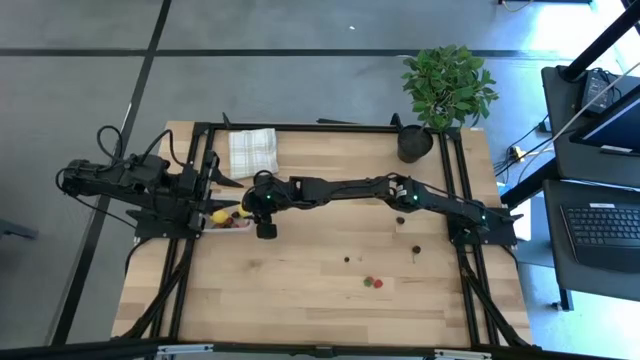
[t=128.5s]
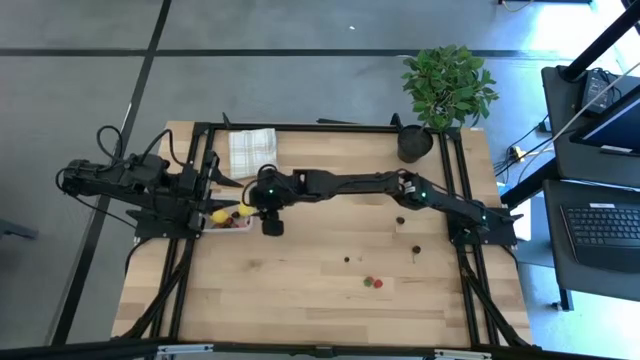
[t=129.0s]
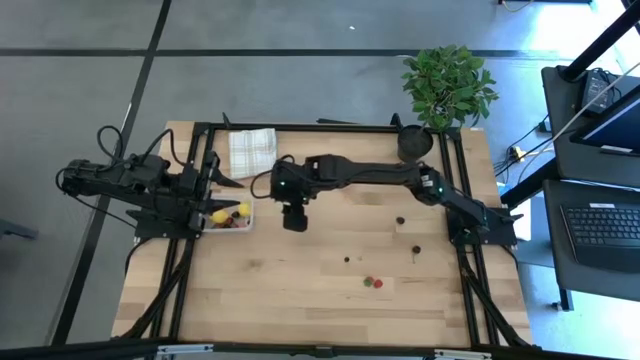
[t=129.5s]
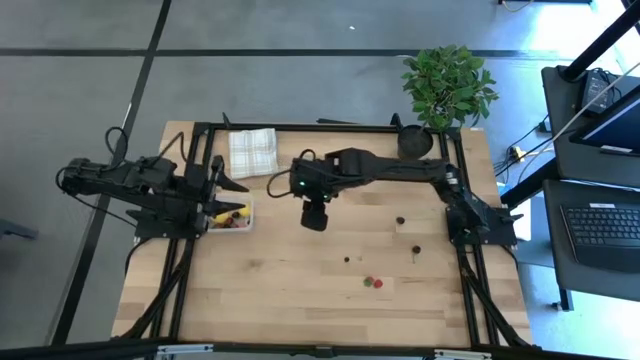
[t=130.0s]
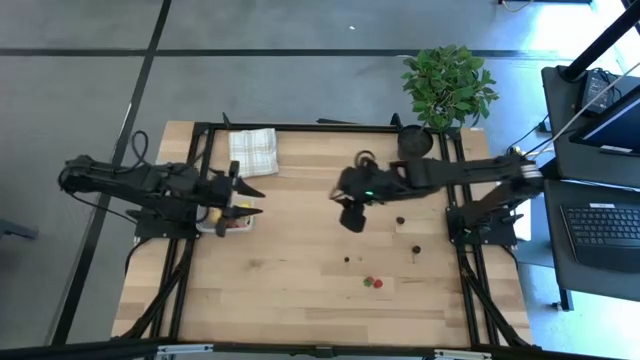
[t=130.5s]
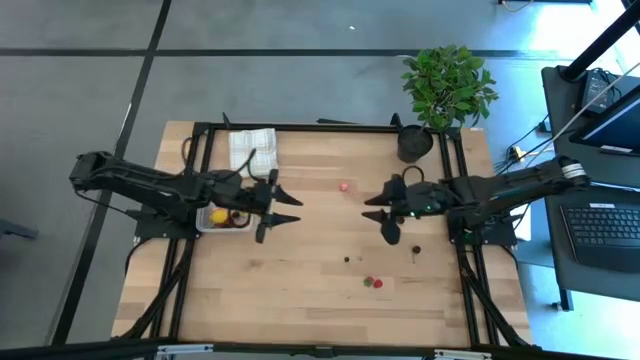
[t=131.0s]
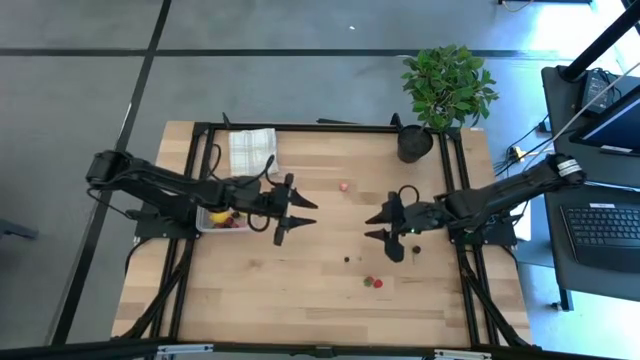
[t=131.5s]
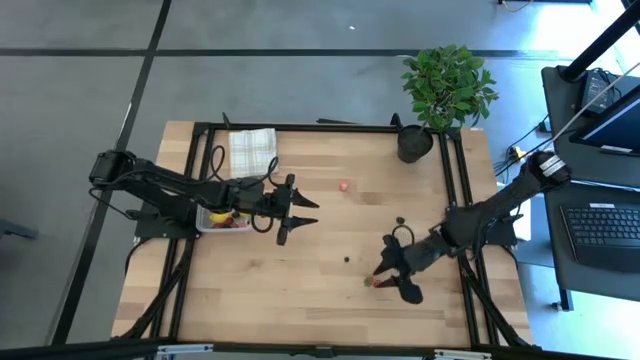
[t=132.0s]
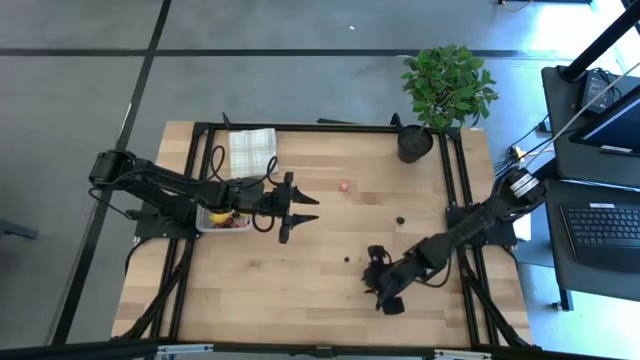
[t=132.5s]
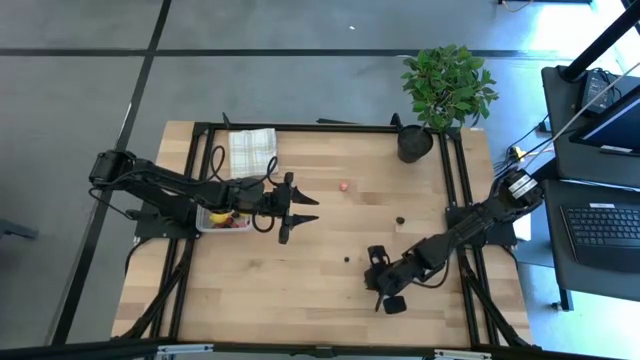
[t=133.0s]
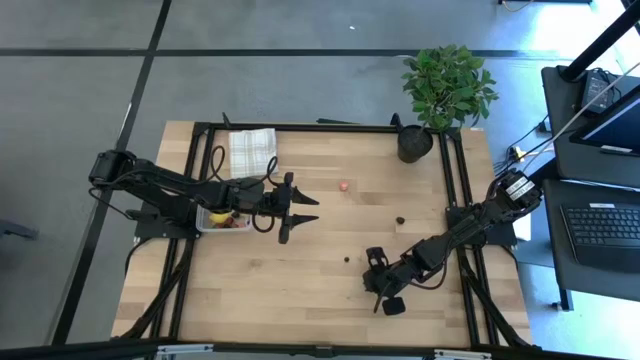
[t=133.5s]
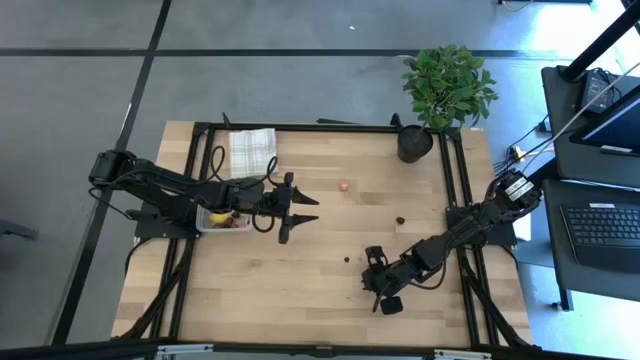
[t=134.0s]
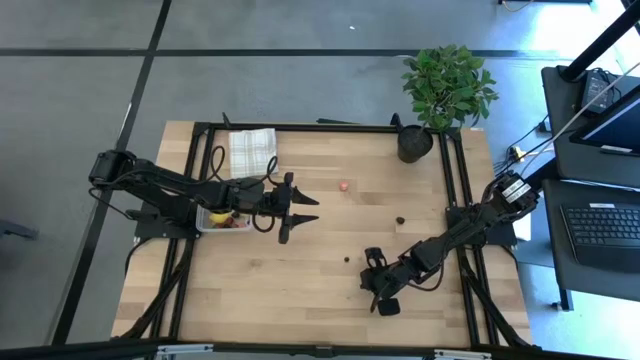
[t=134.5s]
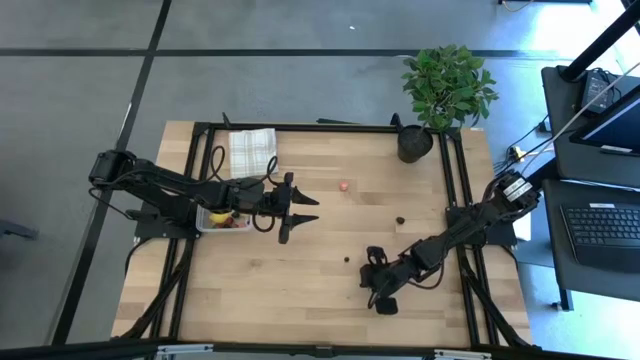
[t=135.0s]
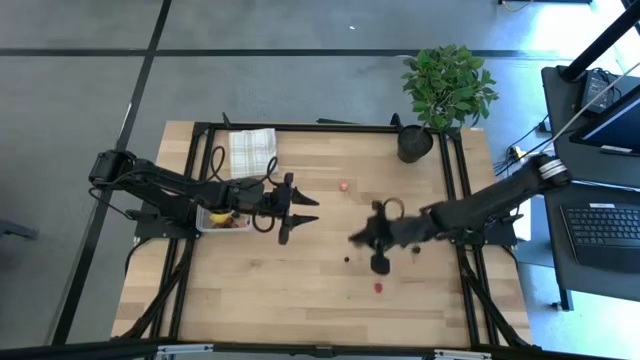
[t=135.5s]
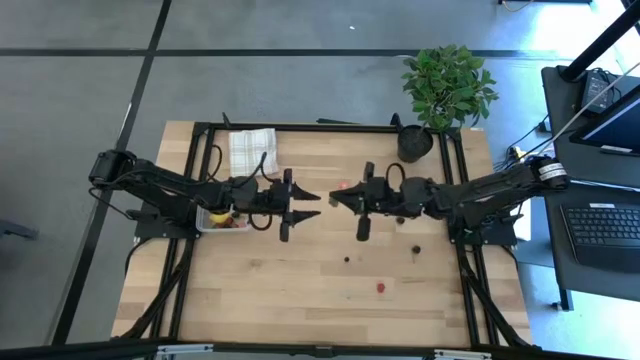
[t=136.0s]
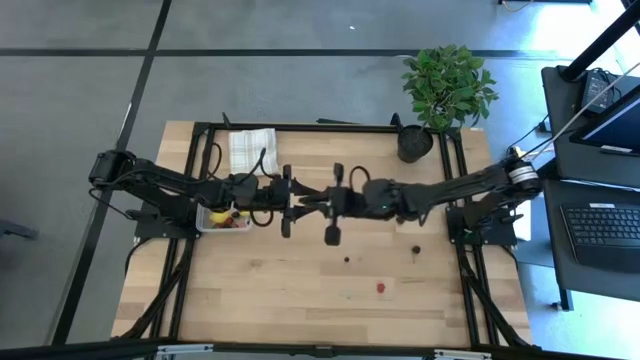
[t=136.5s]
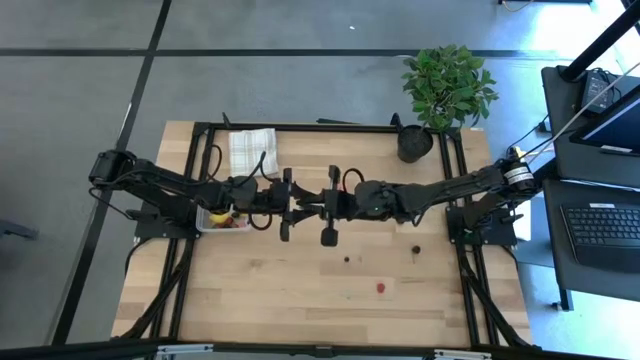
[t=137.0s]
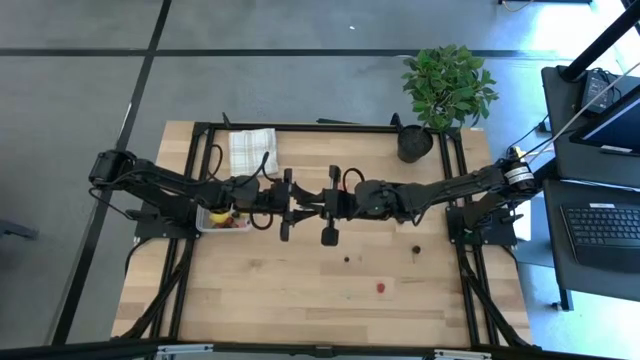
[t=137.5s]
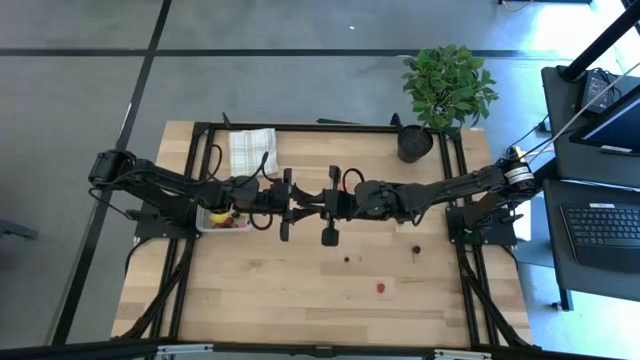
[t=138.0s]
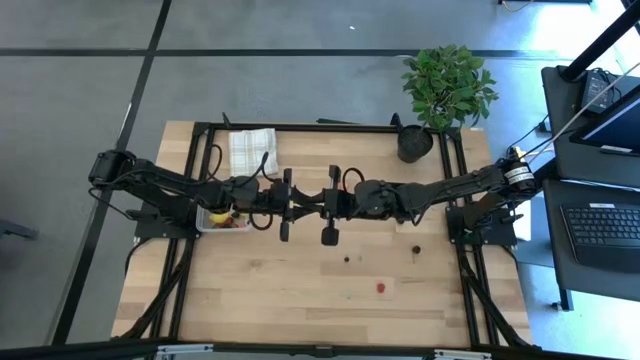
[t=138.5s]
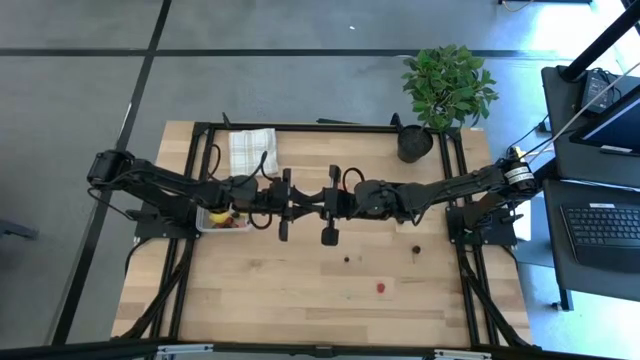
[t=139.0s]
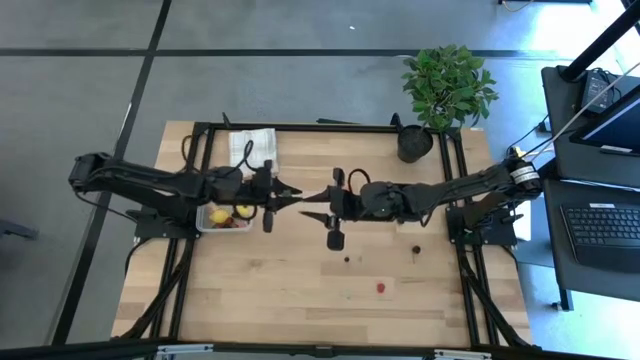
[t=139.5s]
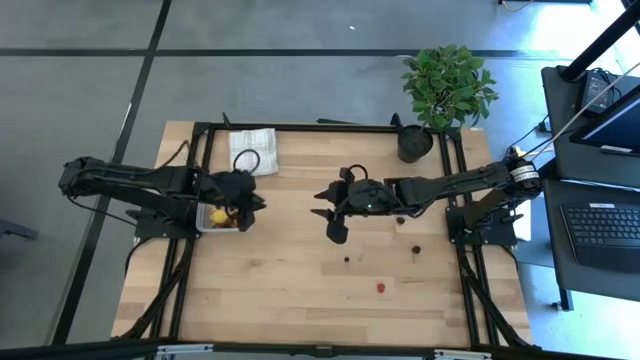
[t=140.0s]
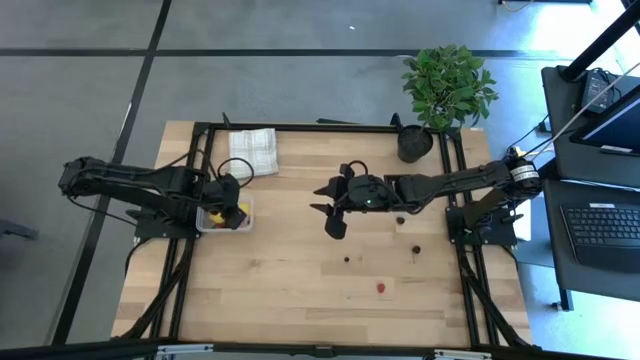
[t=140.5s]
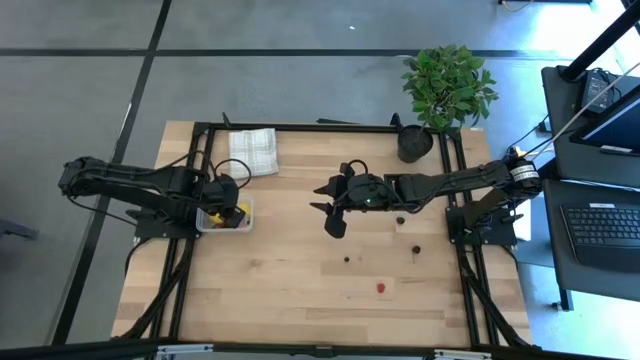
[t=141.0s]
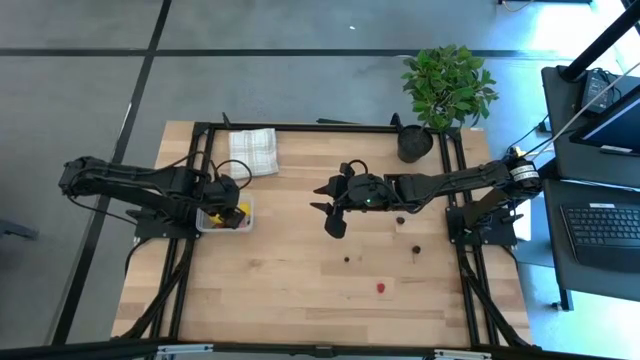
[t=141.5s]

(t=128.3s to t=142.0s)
Task: Pick and placing Produce into tupperware
Put the red strawberry into the transparent bin

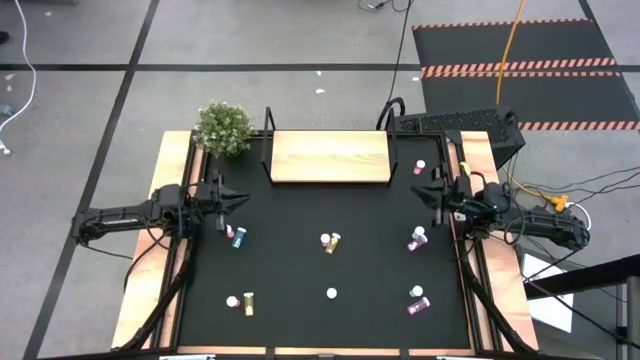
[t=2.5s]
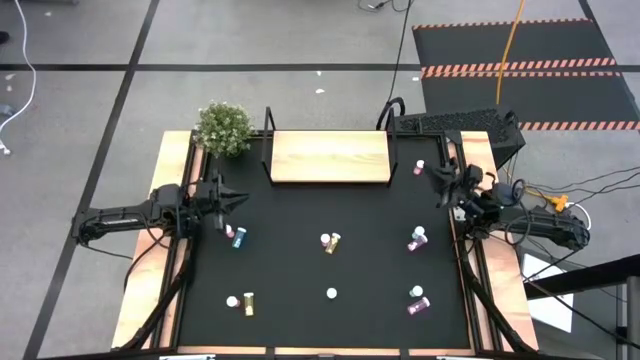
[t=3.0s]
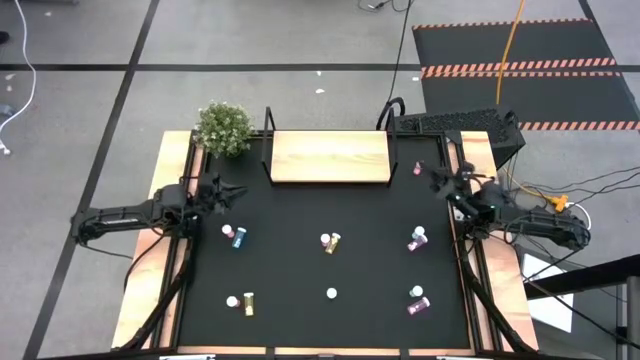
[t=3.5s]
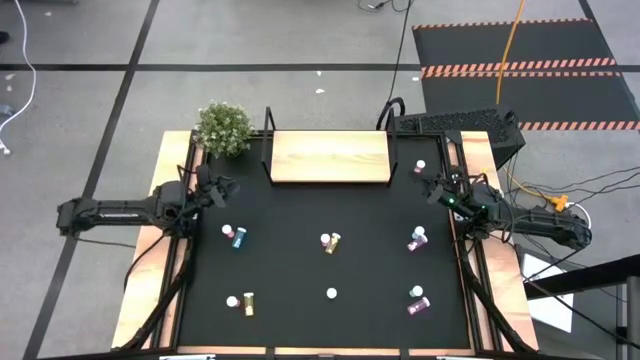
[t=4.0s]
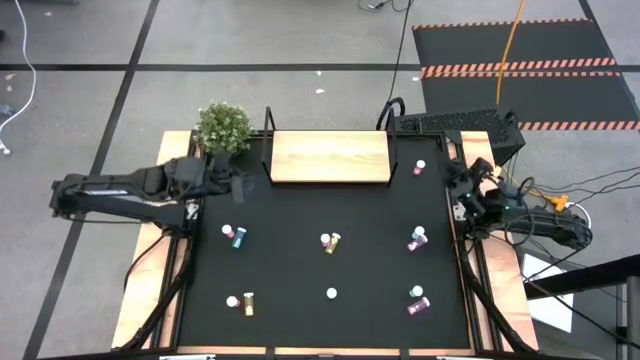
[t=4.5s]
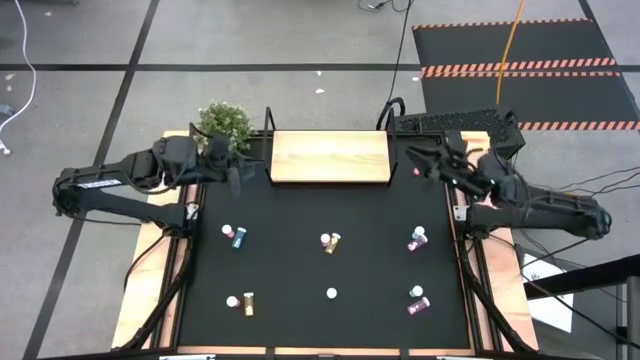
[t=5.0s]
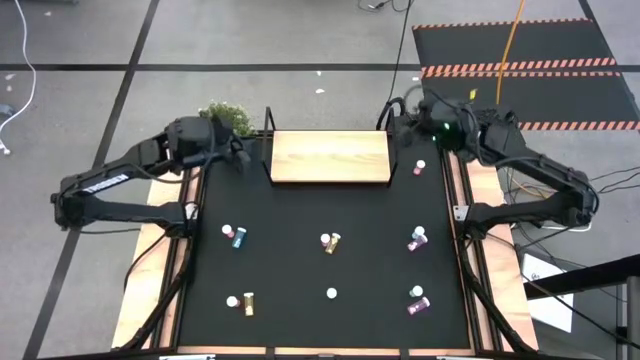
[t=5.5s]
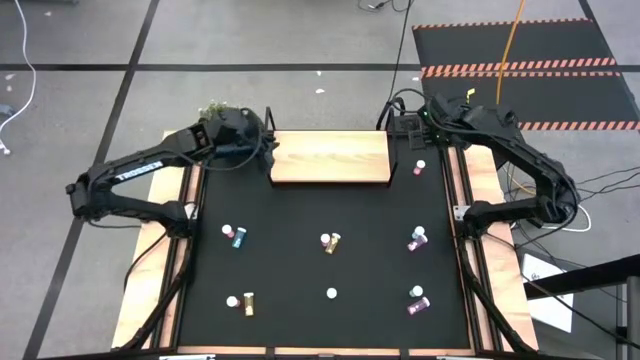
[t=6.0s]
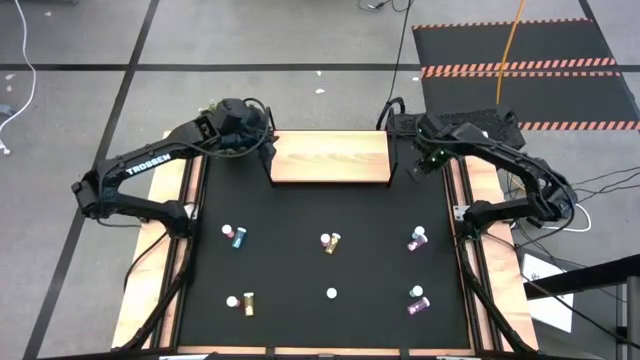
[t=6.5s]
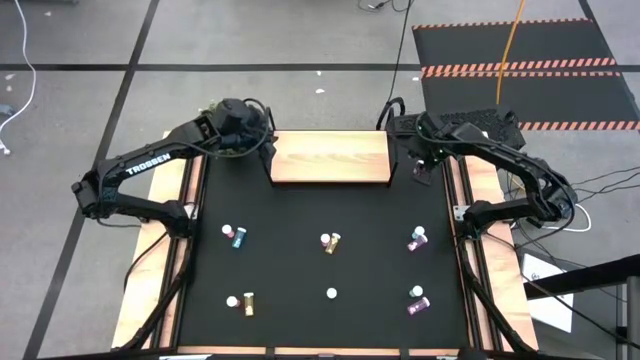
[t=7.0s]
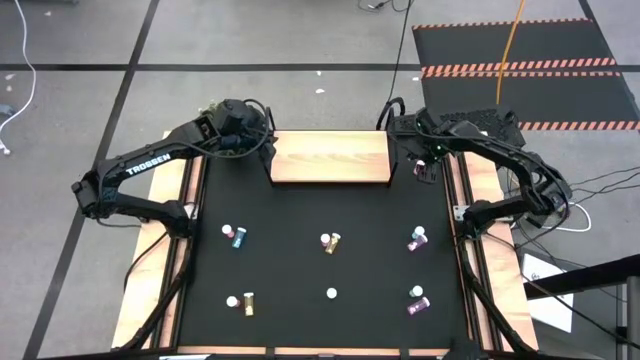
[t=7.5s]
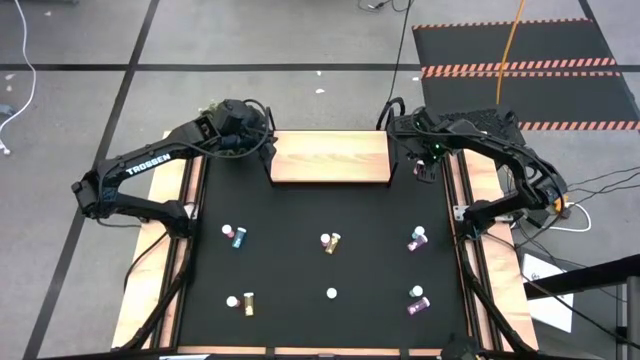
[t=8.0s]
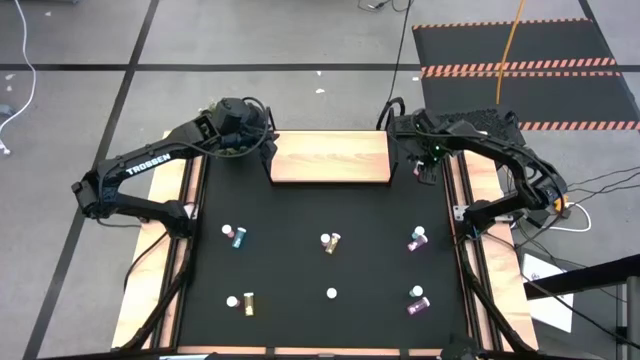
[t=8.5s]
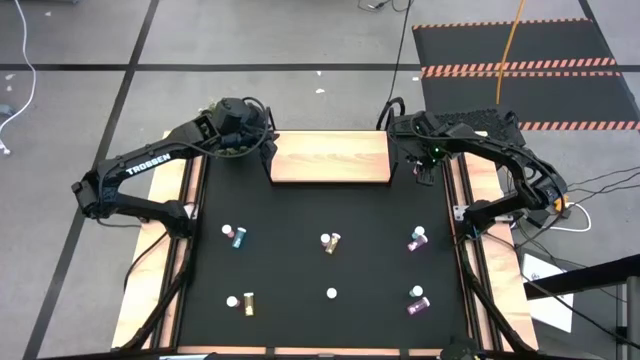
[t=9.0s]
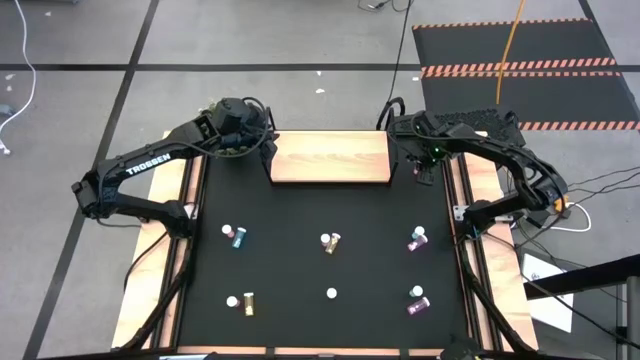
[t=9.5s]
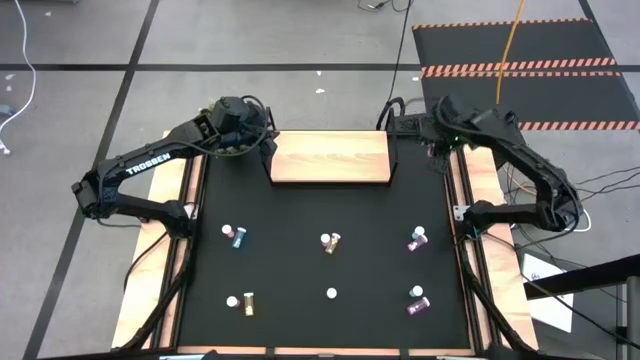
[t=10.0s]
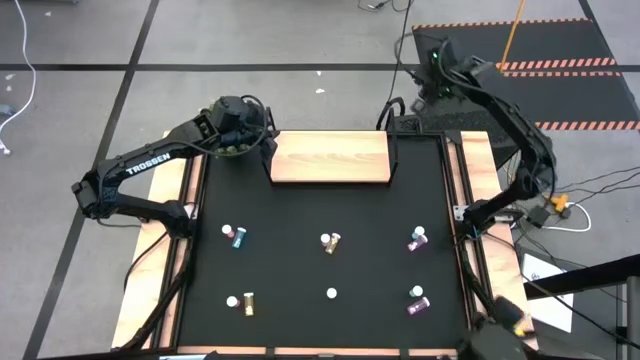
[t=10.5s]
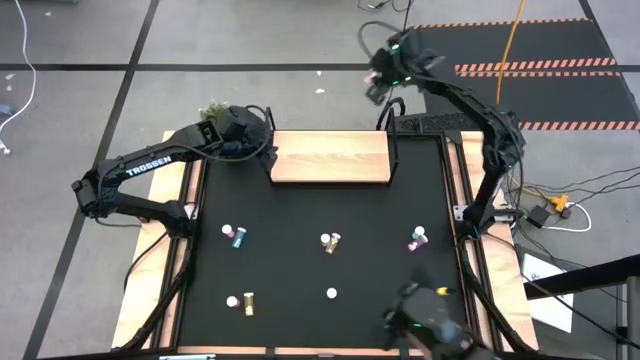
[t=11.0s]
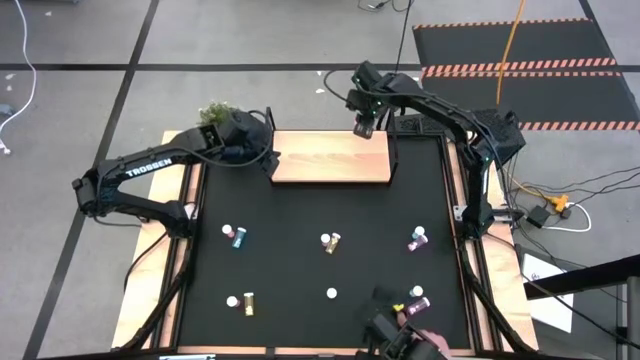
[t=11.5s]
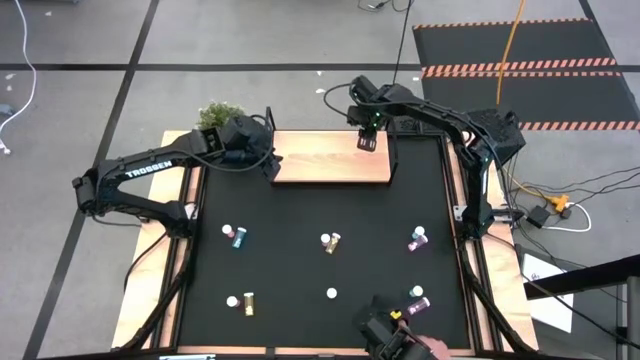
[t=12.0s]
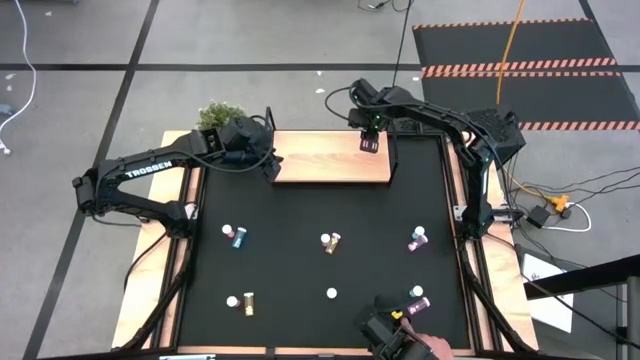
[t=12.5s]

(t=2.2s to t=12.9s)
Task: Pick and place medicine bottles onto shelf by color
Put the top left pink pill bottle on the shelf
